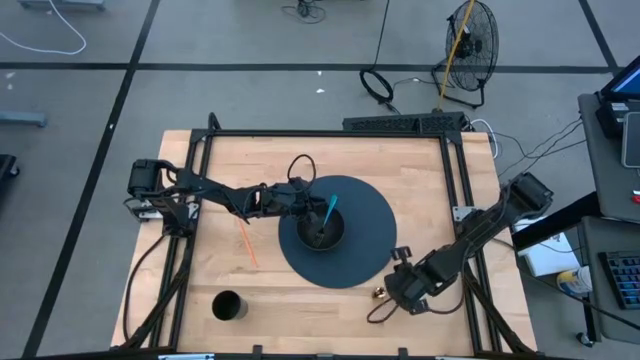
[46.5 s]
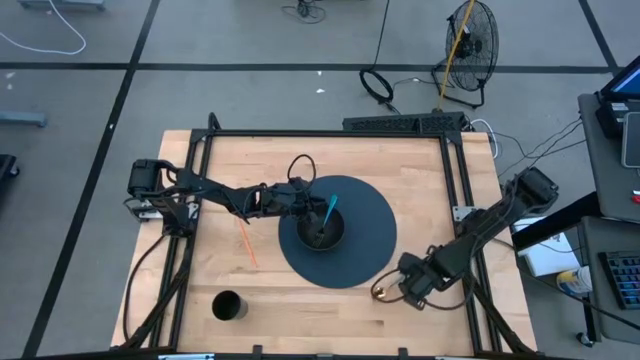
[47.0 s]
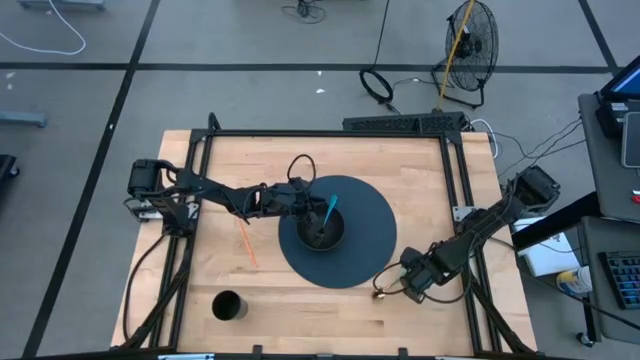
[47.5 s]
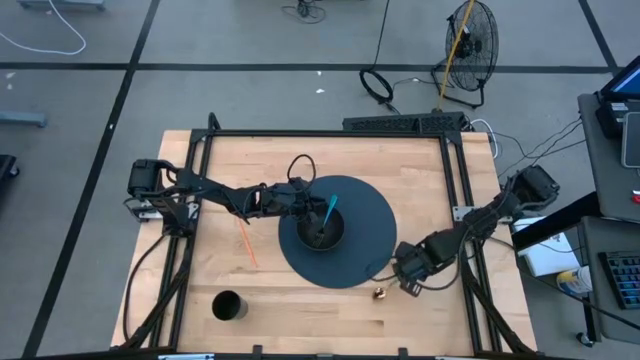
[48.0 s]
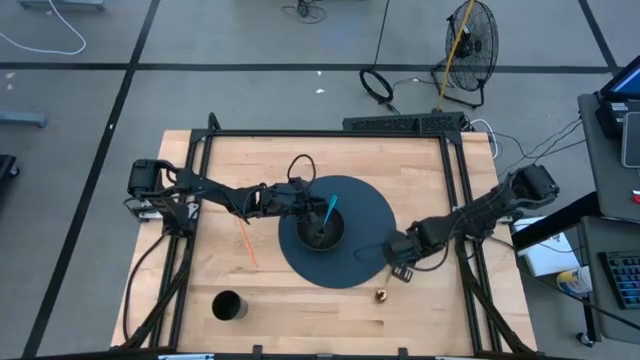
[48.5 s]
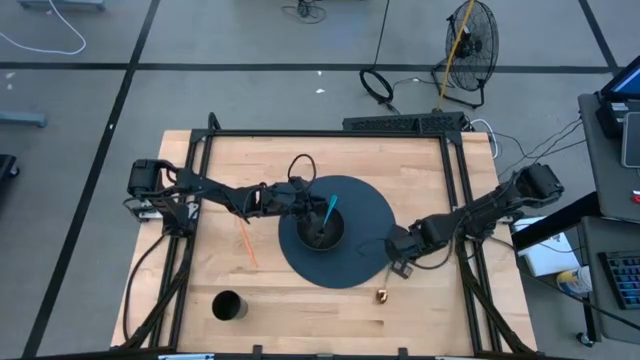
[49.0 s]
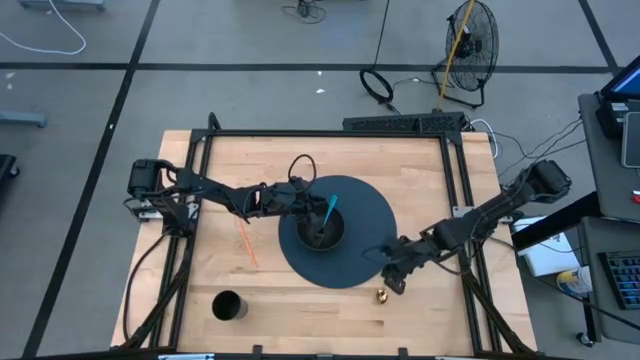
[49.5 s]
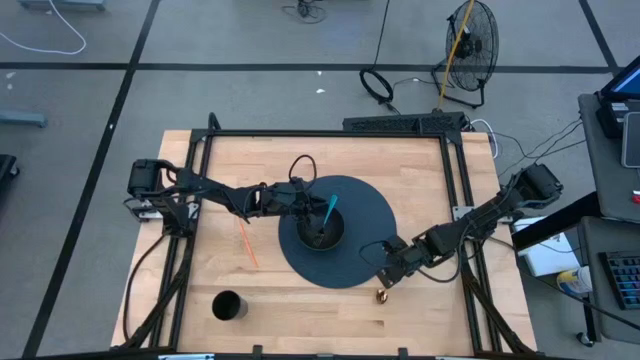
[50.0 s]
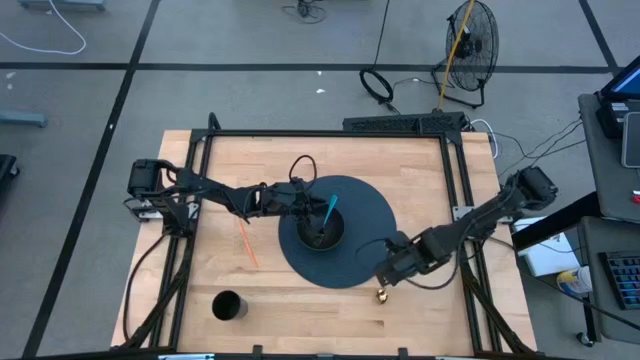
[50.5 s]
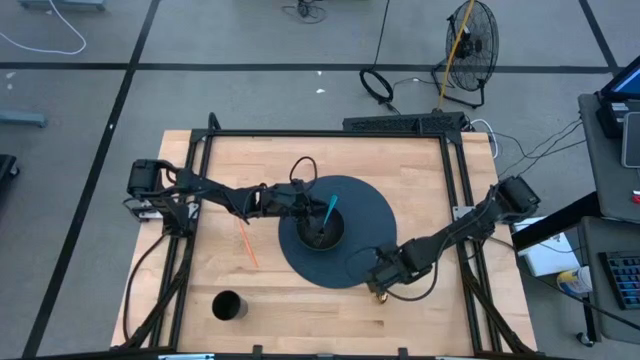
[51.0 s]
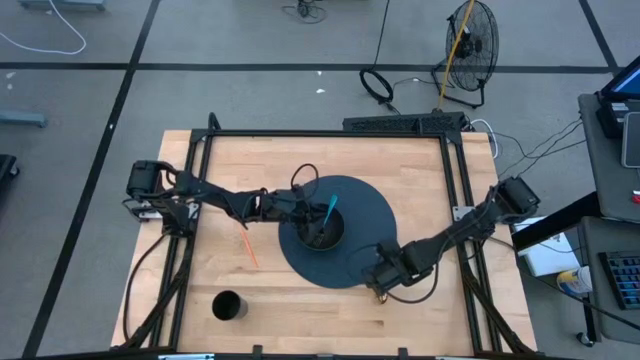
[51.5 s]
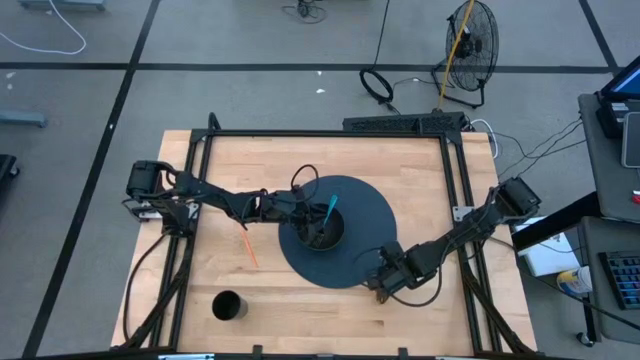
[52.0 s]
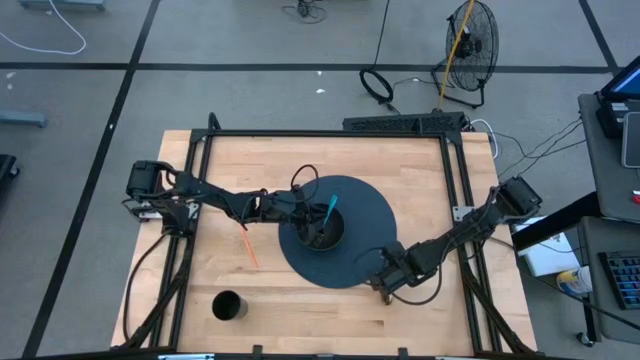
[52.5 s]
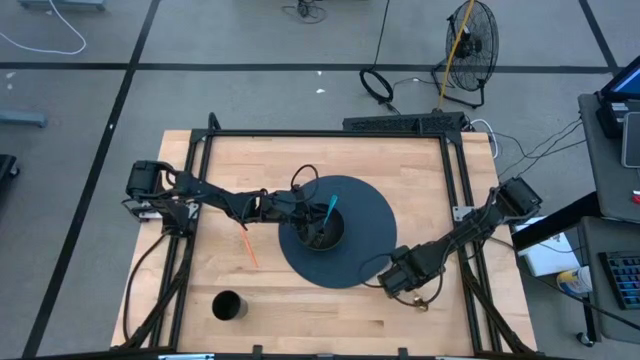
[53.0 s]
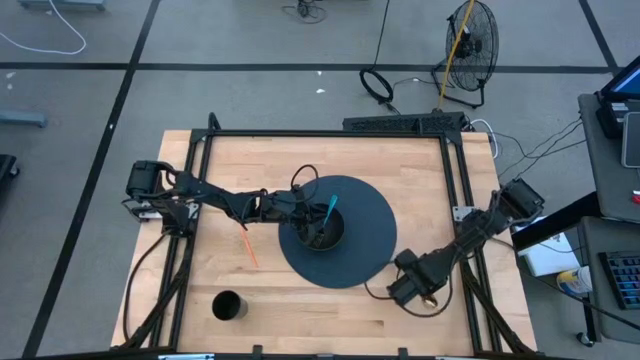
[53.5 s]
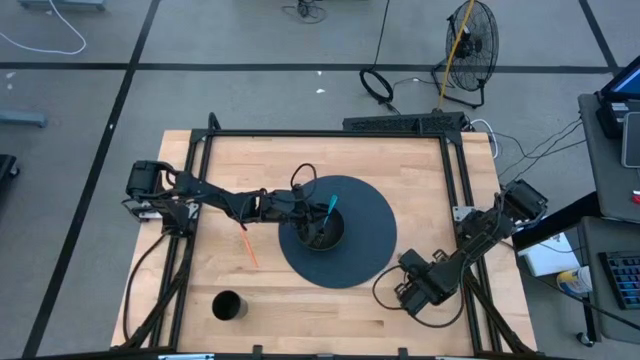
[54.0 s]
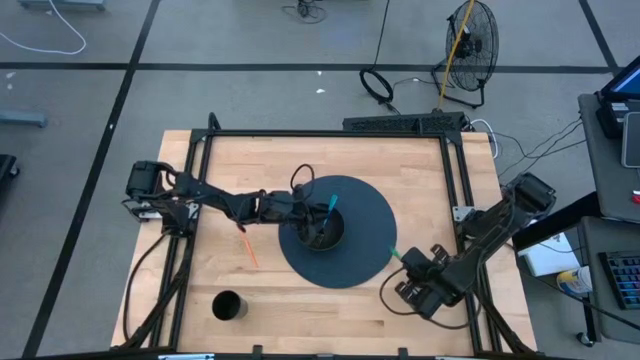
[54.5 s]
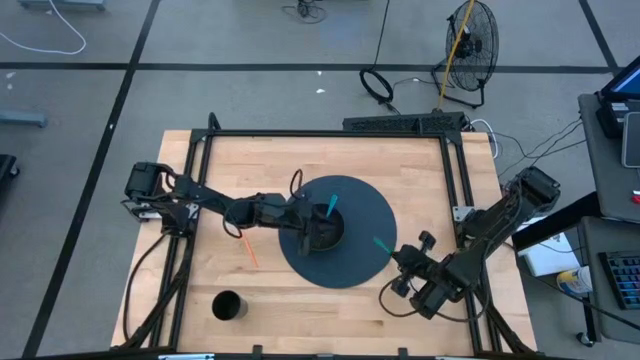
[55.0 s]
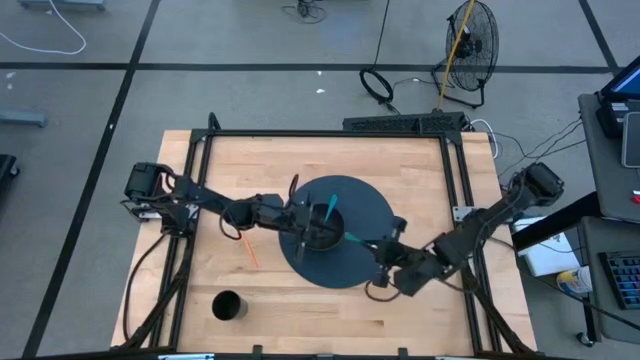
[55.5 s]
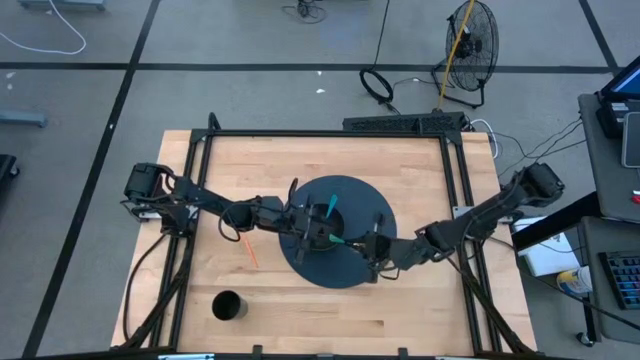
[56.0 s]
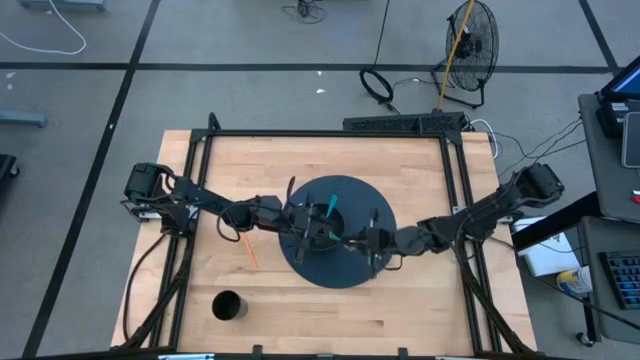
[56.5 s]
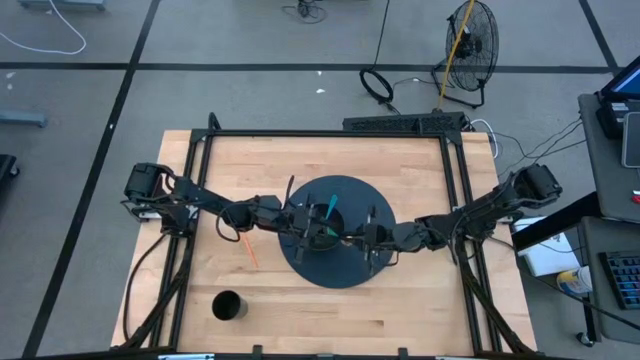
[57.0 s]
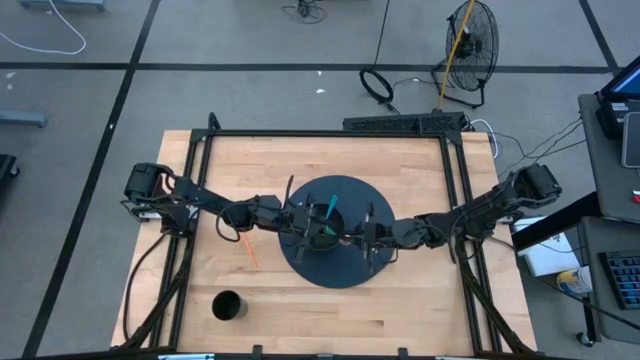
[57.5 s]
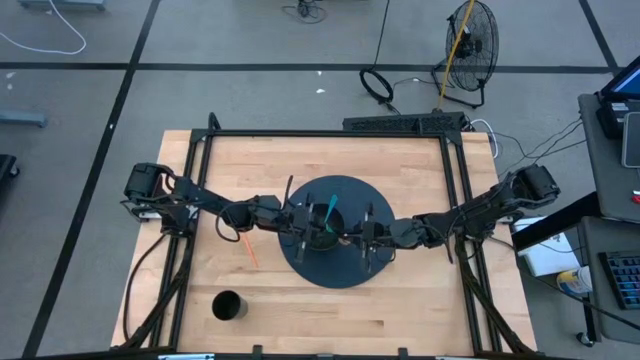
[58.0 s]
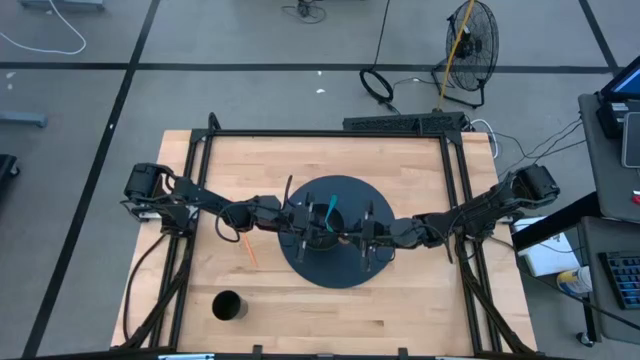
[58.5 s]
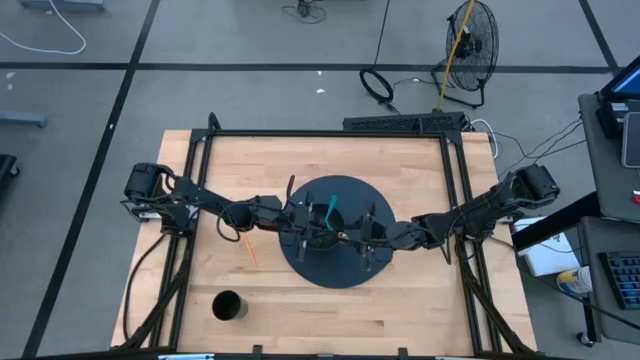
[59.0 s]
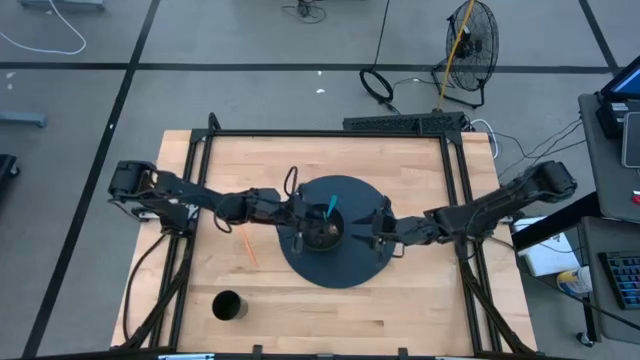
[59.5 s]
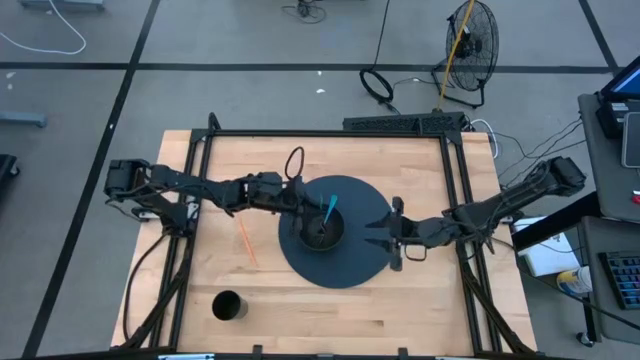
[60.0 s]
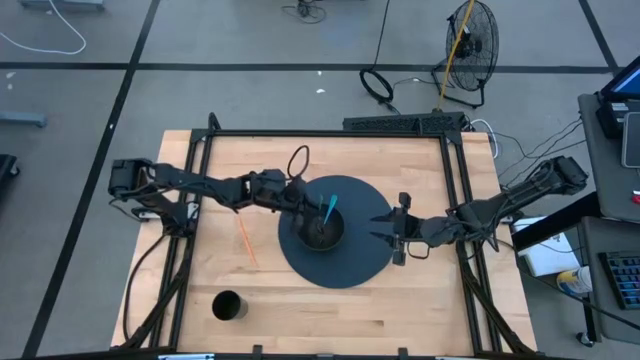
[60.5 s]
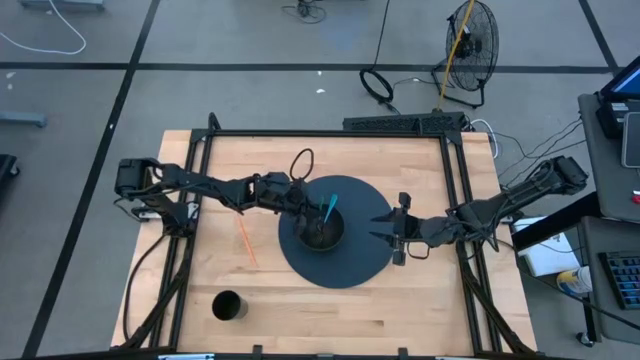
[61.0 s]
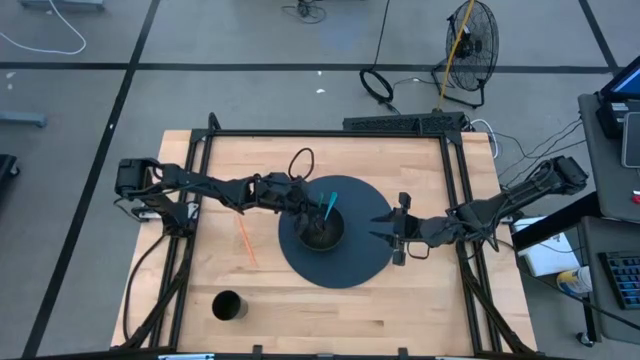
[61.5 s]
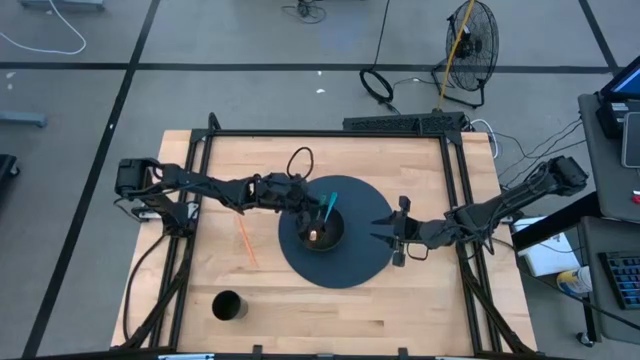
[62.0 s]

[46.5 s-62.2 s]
Task: Pick & Place Utensil
Put the gold spoon into the black bowl on the blue table placemat

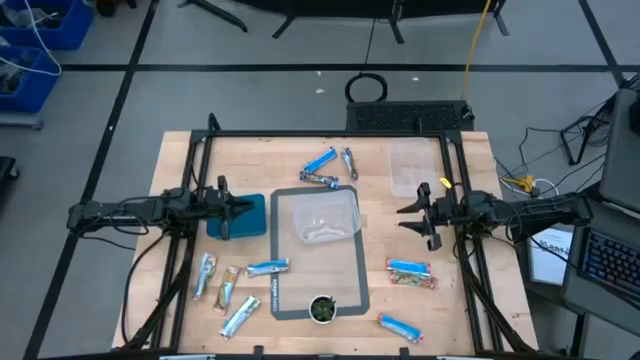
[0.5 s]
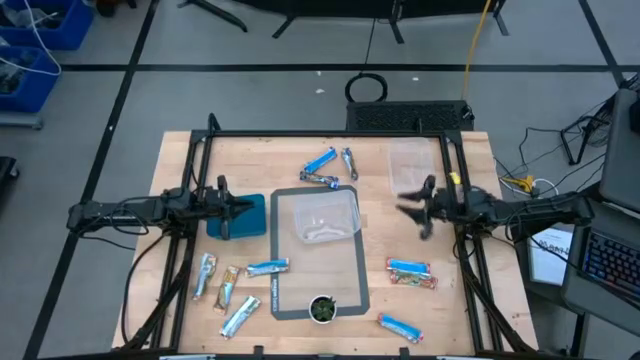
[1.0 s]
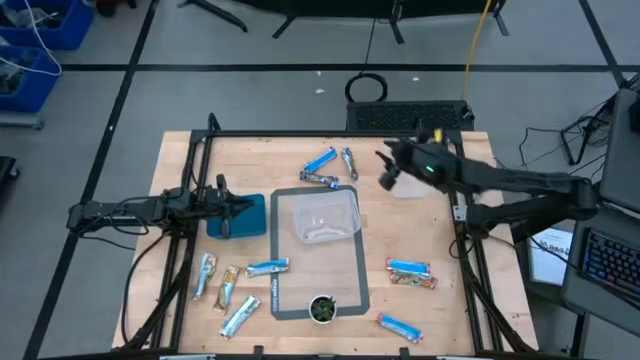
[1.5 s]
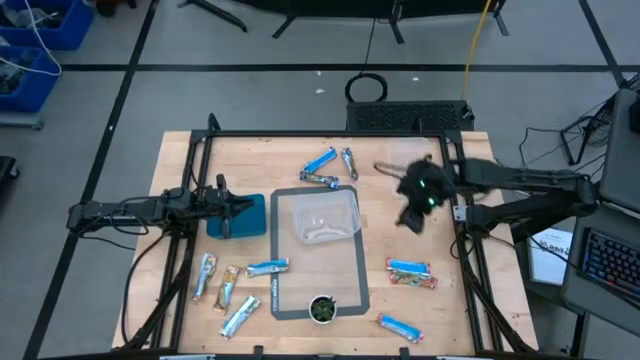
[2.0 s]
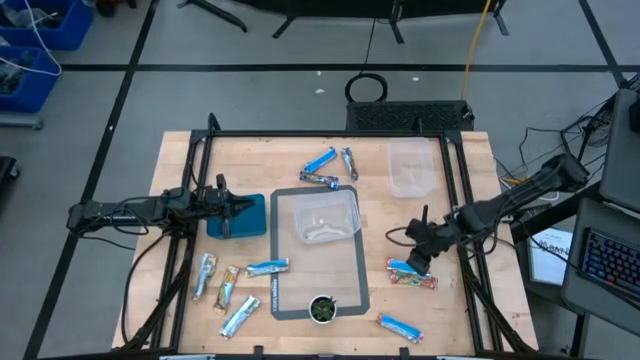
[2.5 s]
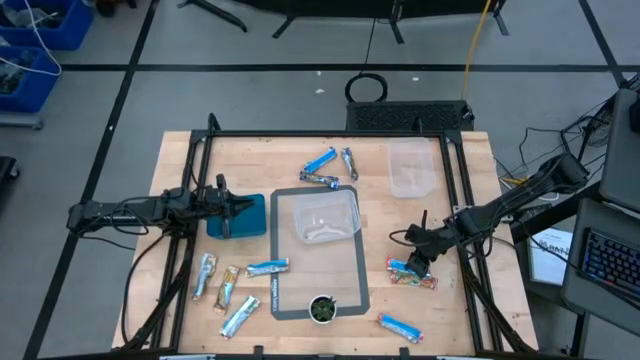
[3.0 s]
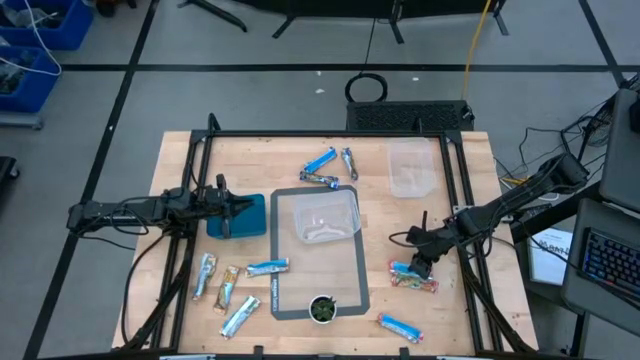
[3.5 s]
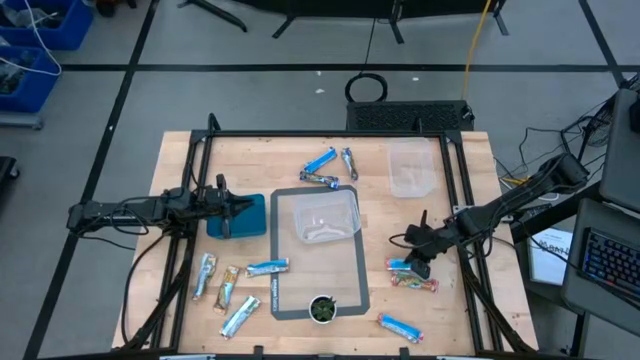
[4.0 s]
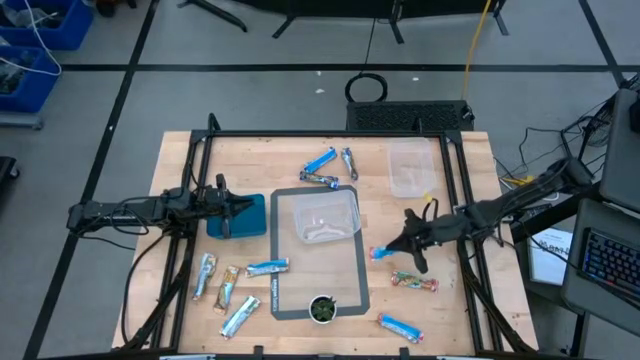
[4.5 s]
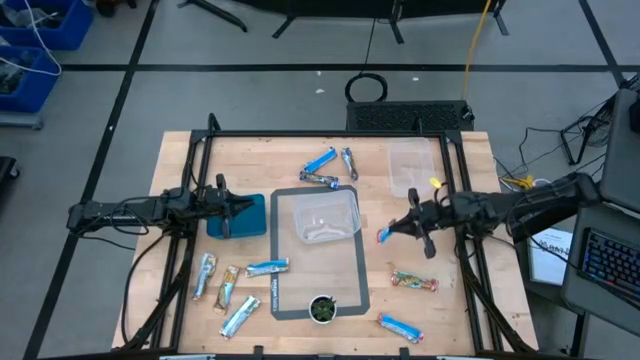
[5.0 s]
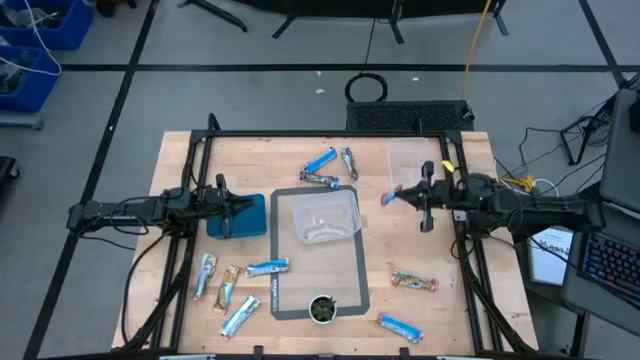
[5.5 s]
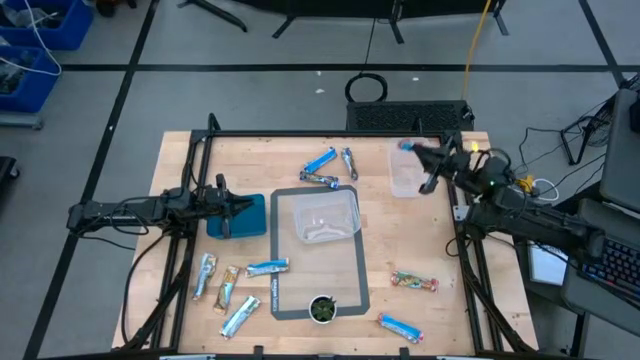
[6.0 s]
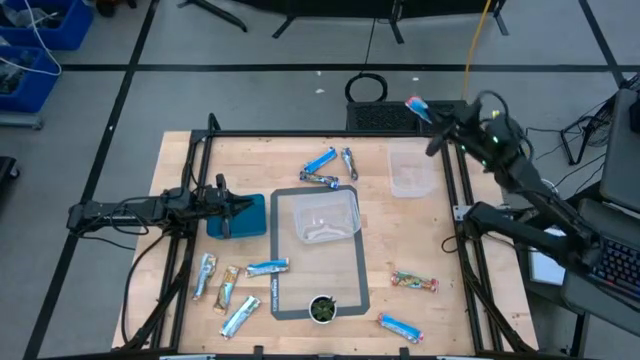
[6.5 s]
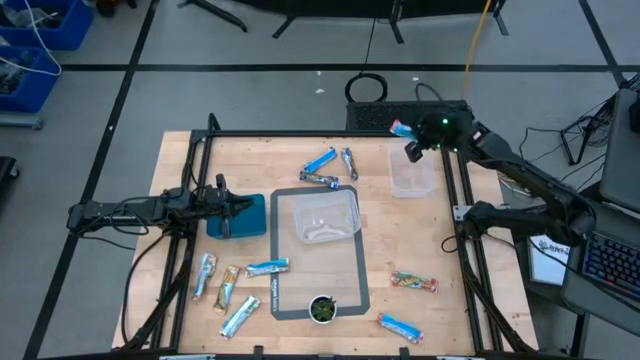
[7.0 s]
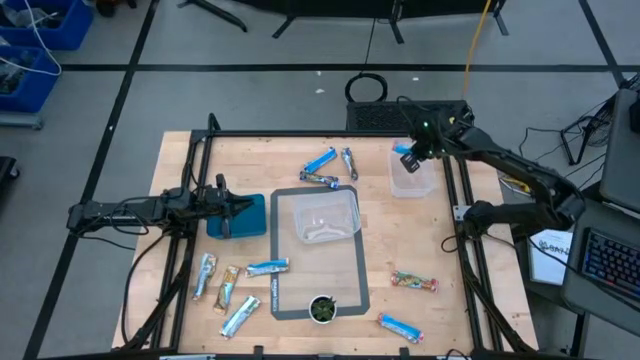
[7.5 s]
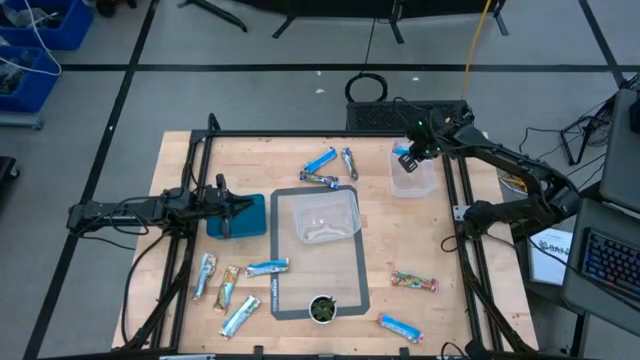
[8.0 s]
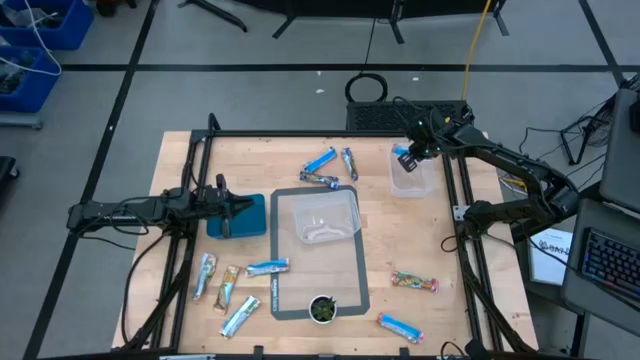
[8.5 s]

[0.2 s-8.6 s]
Task: Pick and place Granola Bars by type
Put the red granola bar into the right transparent bin
